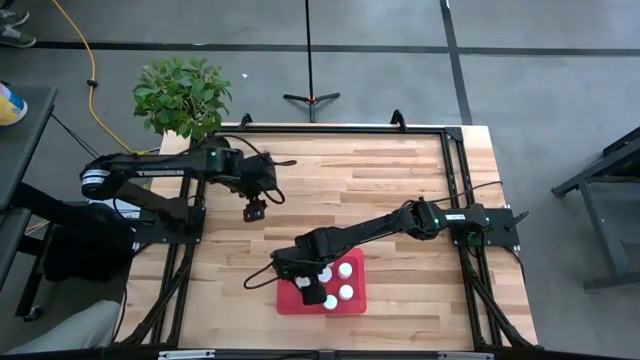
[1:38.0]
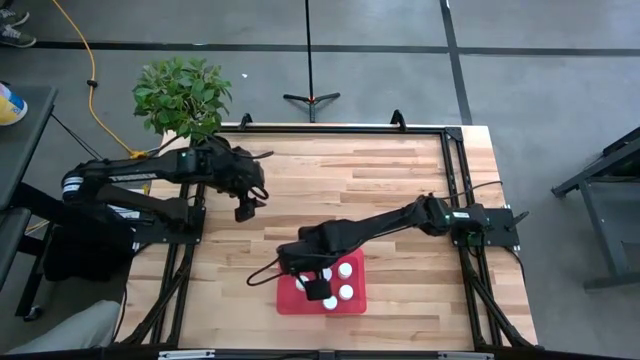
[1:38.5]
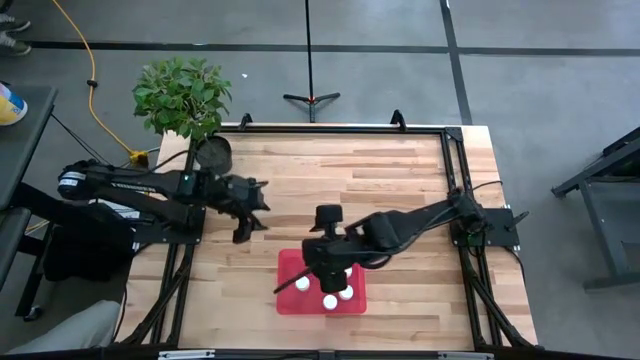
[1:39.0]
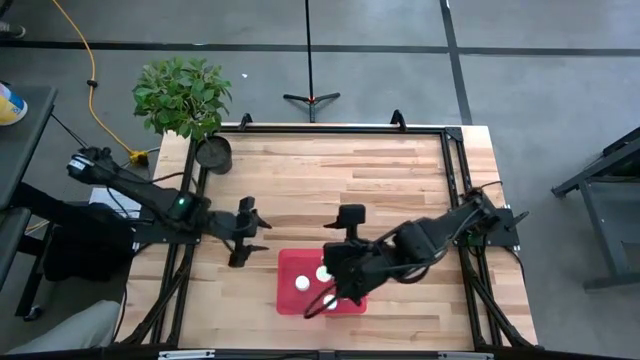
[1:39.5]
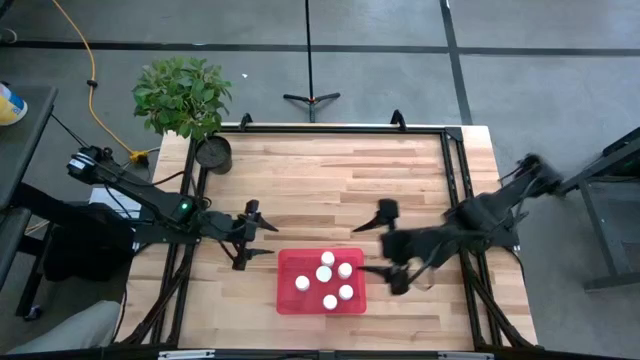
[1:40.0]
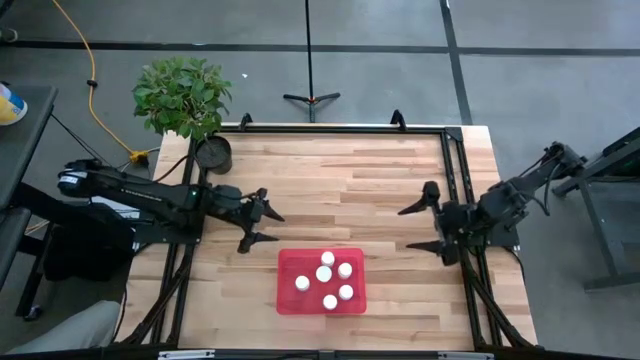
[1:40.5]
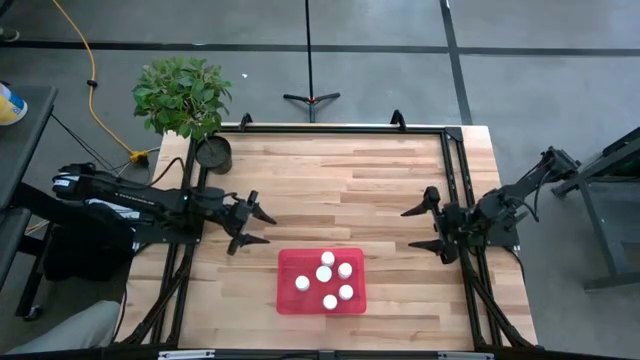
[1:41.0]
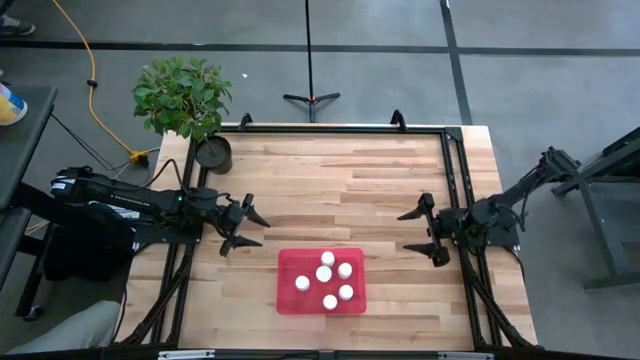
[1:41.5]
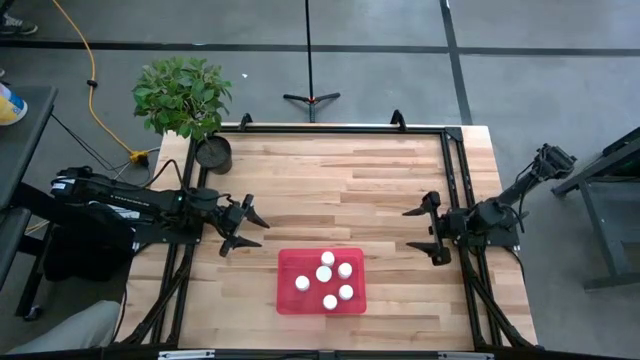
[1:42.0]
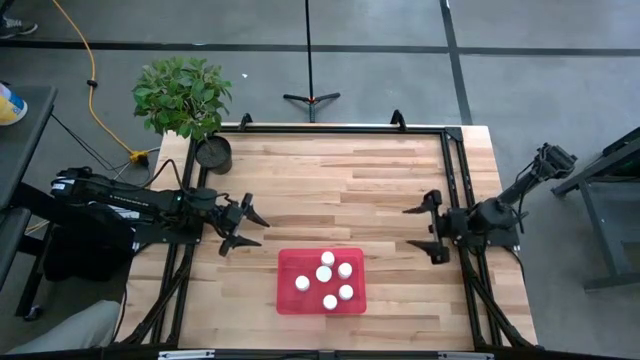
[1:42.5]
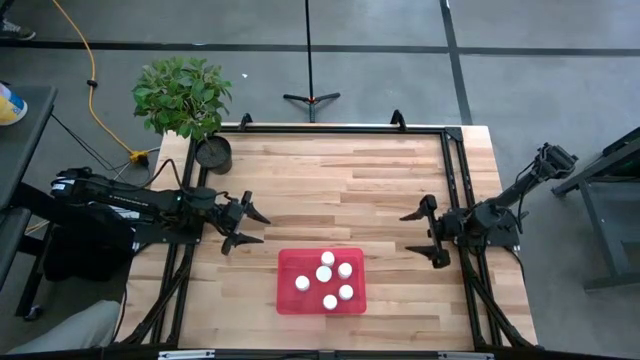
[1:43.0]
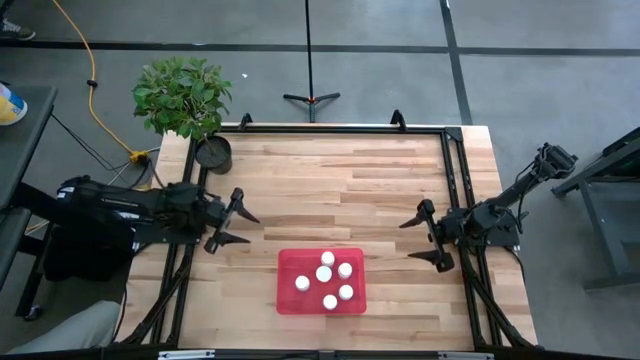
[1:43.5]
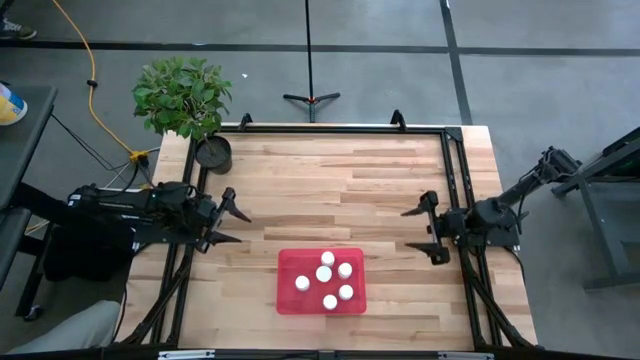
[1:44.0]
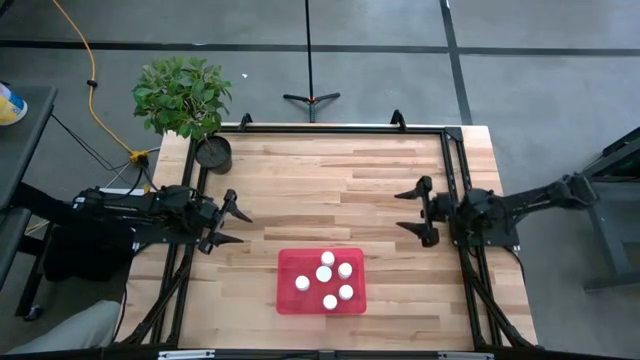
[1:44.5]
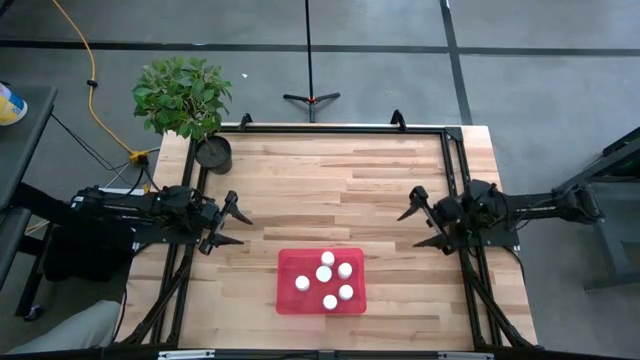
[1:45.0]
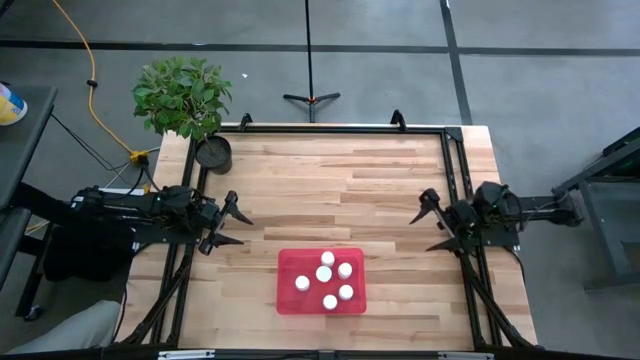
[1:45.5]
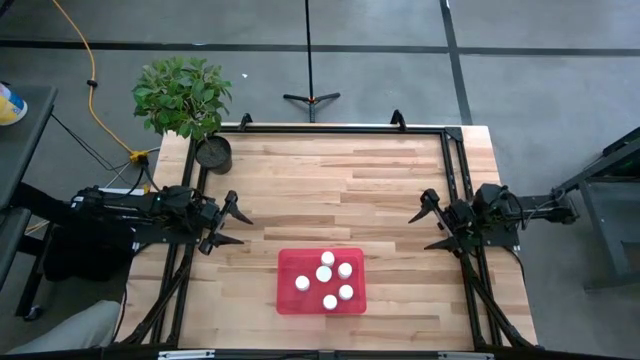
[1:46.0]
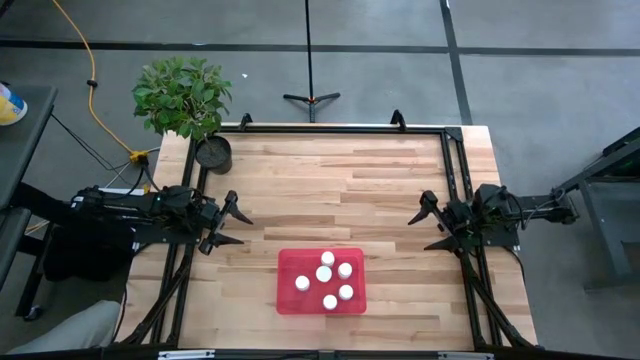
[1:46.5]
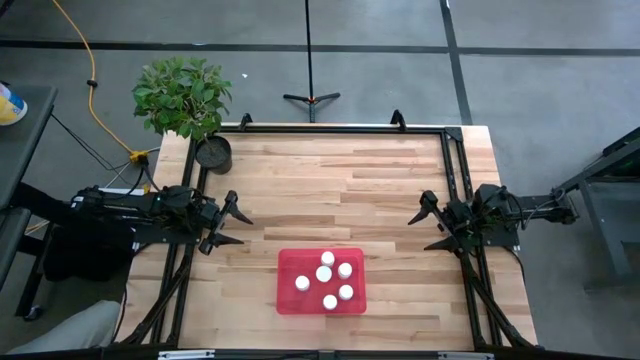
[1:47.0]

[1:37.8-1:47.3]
Task: Pick and place pill bottles into a basket
Return to Home Position

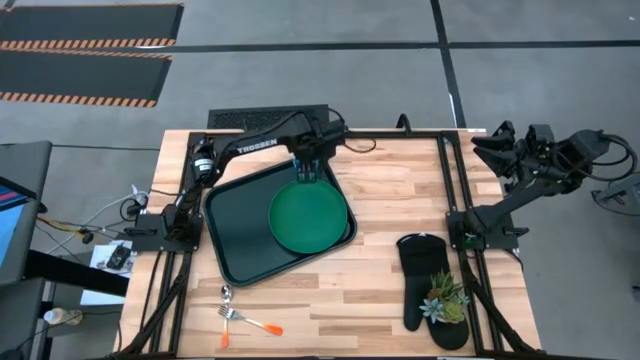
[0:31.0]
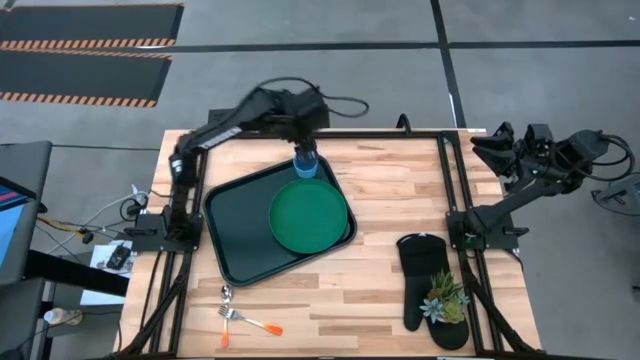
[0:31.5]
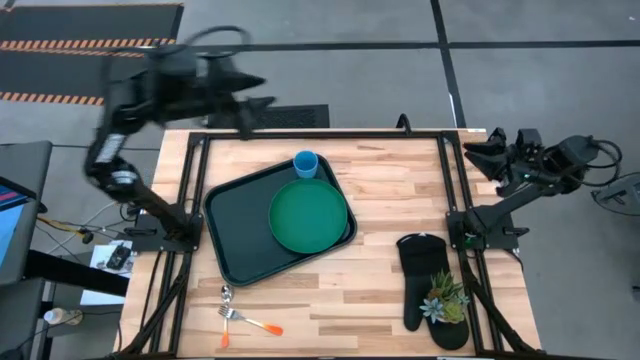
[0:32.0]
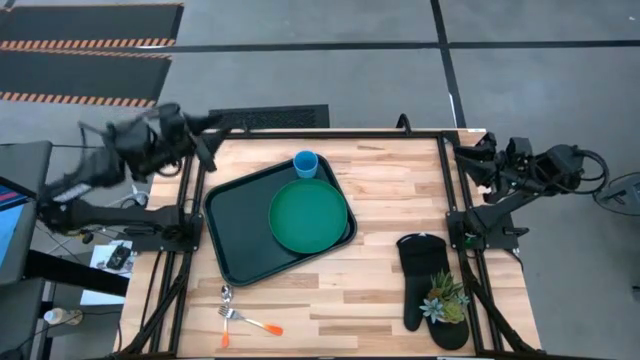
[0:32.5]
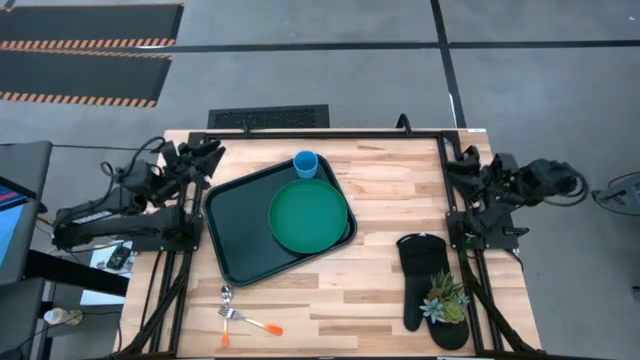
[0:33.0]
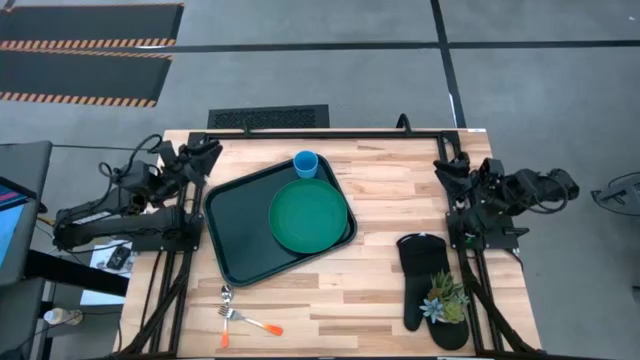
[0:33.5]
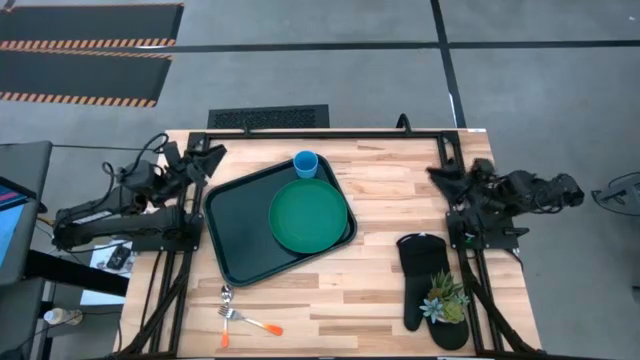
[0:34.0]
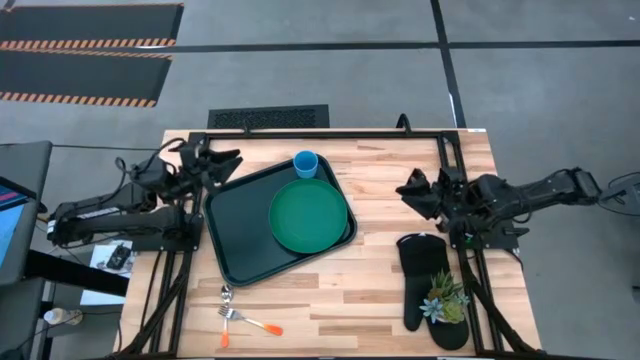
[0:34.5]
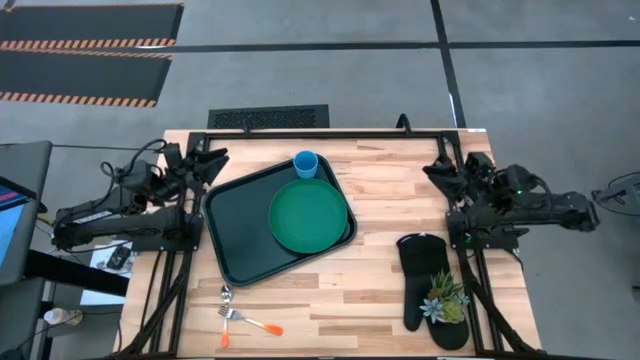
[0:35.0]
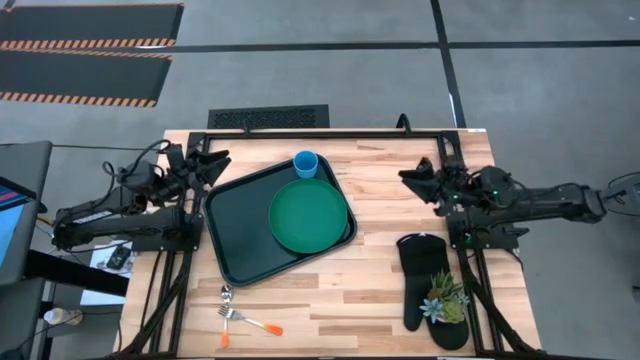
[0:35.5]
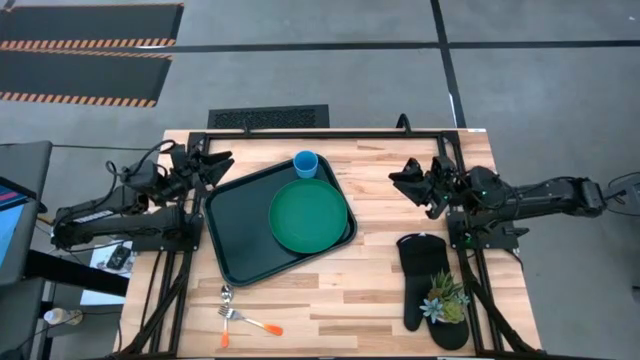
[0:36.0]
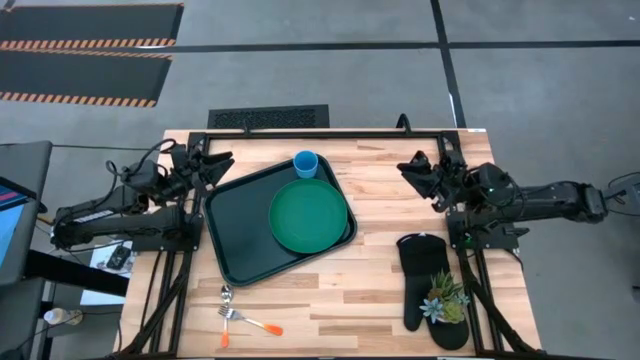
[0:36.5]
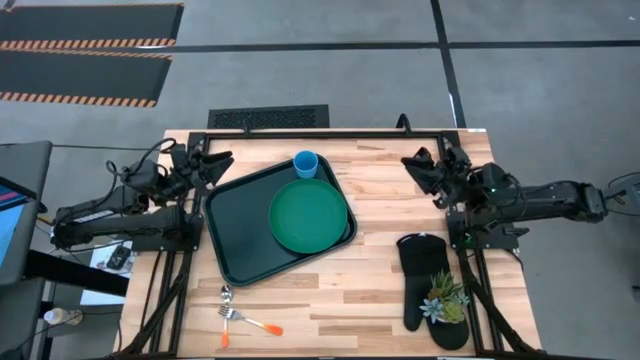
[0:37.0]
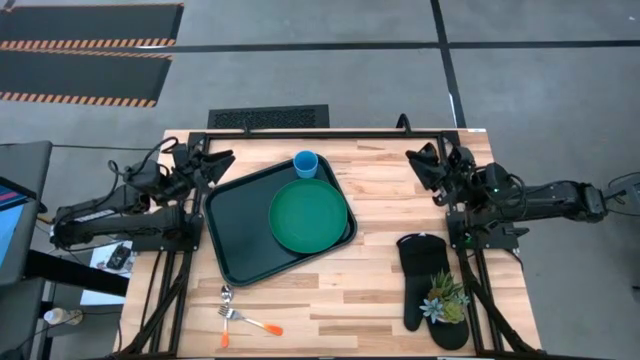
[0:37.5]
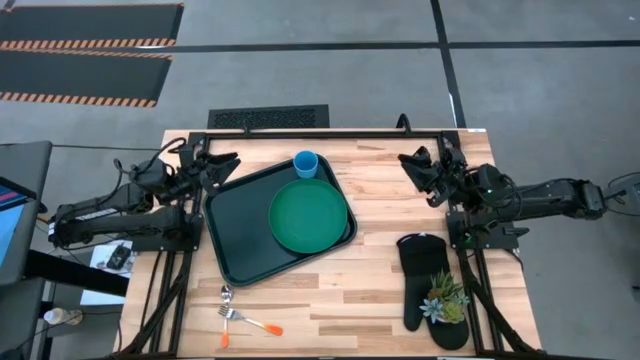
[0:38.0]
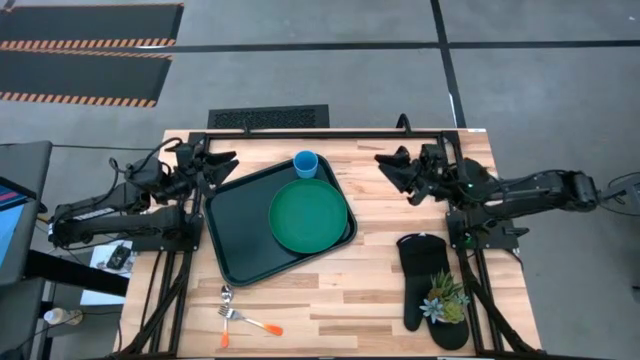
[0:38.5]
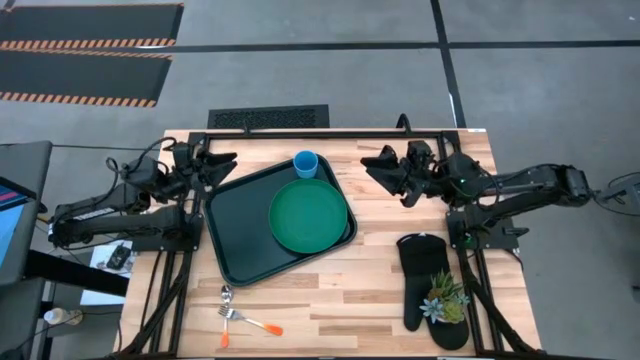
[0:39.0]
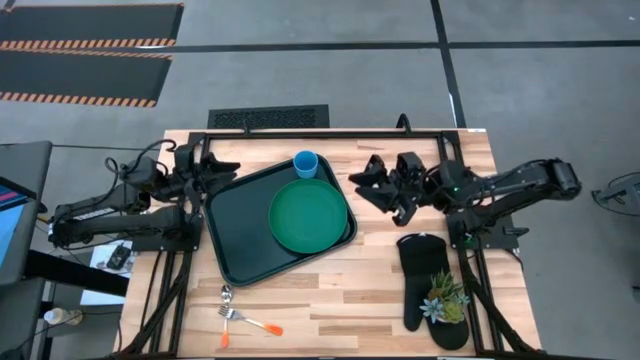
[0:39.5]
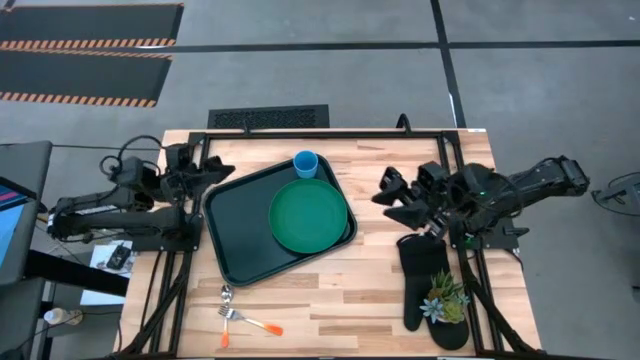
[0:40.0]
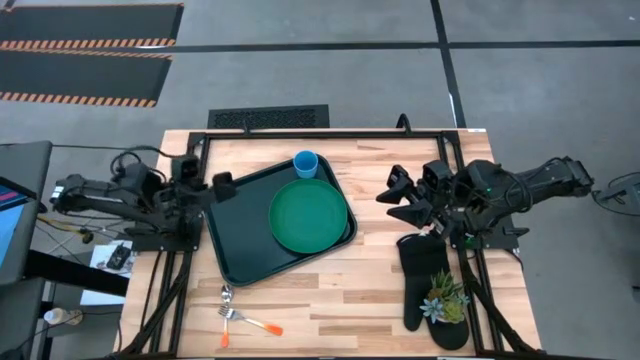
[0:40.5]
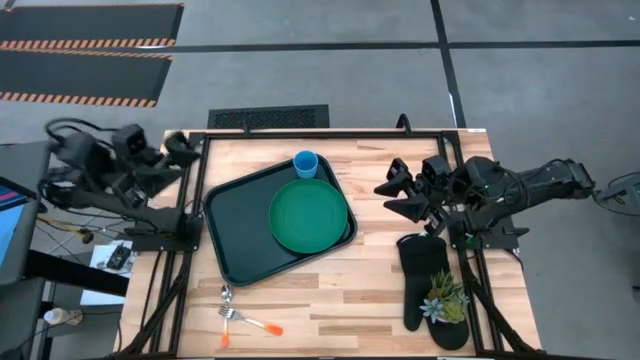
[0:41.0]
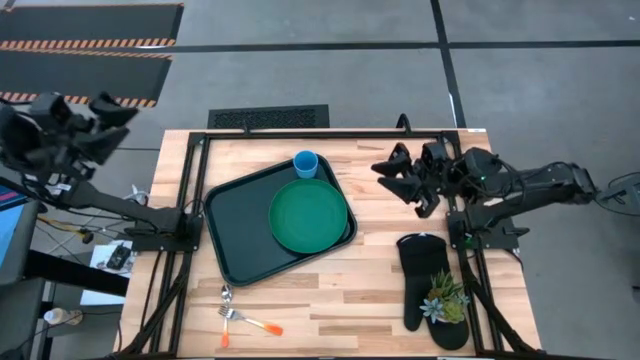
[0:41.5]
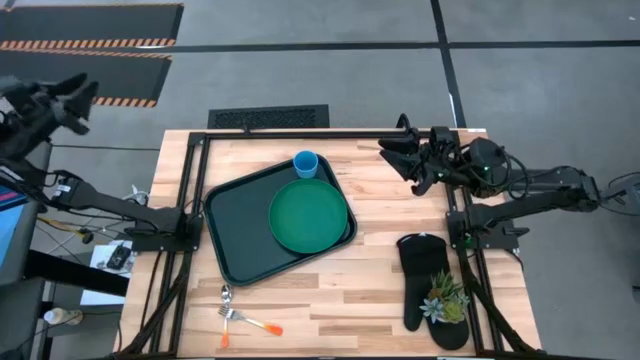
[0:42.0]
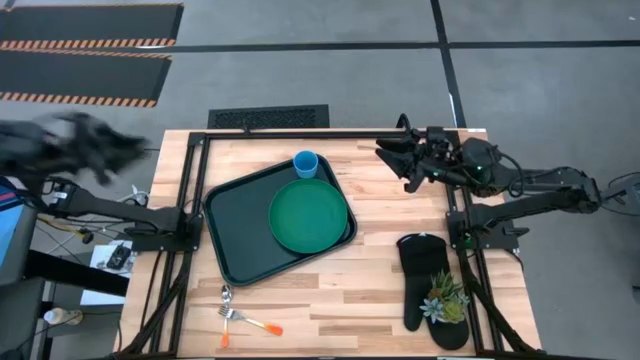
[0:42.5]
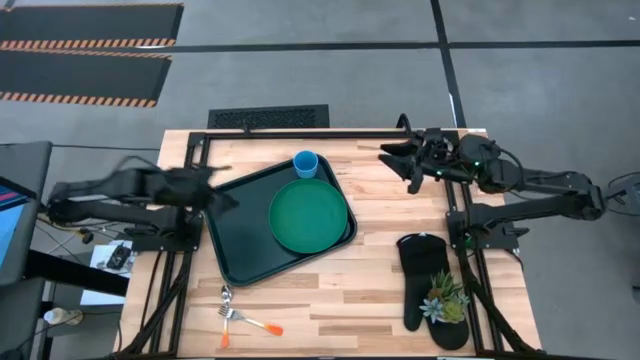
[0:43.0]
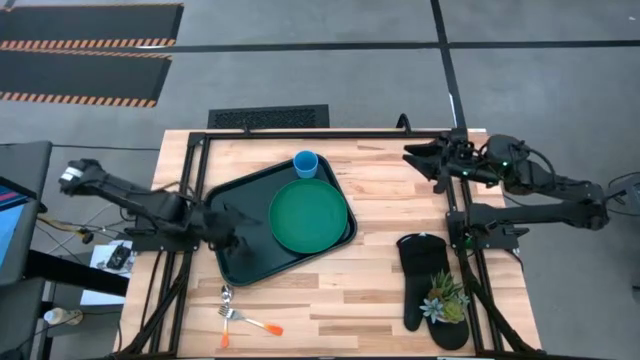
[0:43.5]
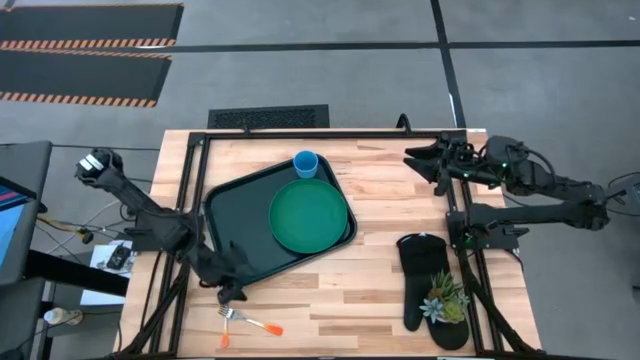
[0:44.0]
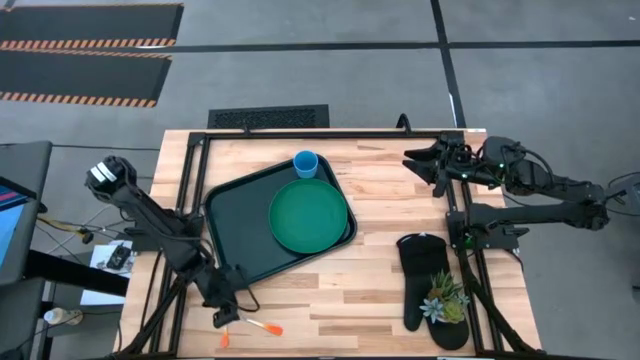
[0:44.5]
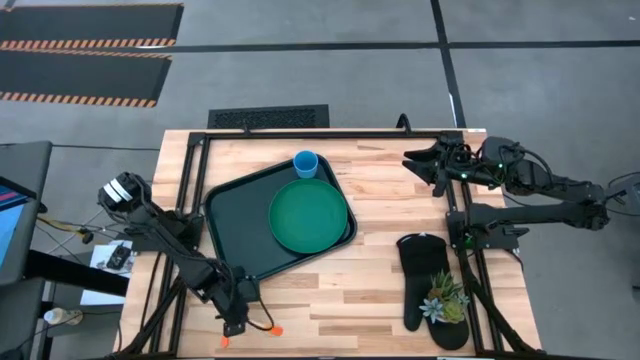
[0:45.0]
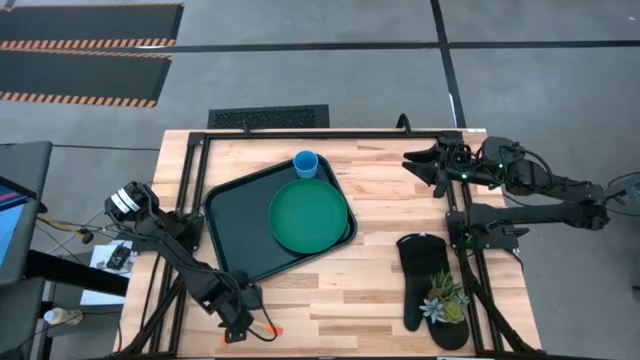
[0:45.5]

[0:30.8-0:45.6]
Task: Pick and place plate/cup/fork/spoon on tray
Put the orange fork on the black tray to the left of the green plate
